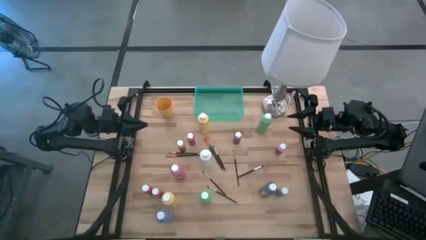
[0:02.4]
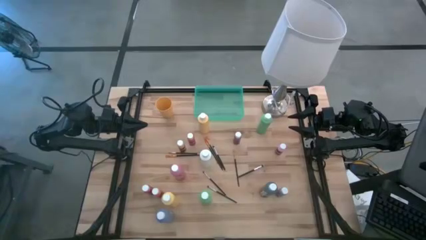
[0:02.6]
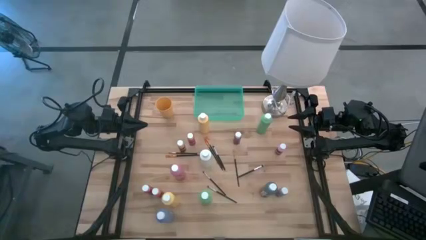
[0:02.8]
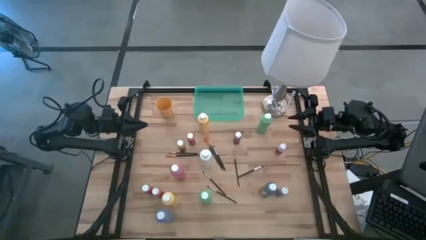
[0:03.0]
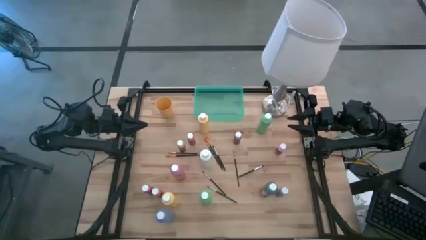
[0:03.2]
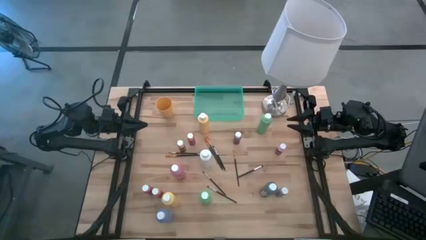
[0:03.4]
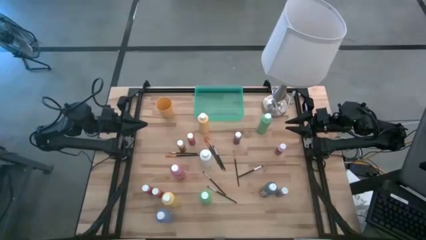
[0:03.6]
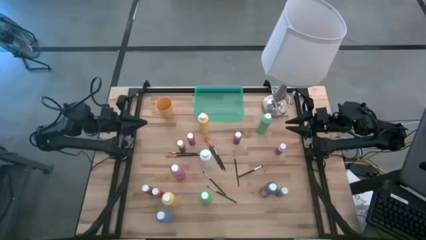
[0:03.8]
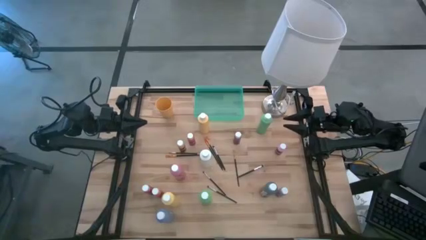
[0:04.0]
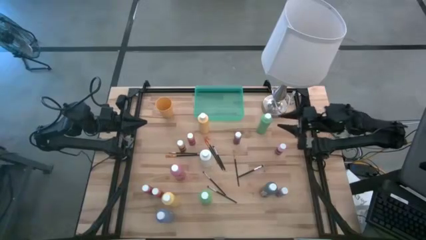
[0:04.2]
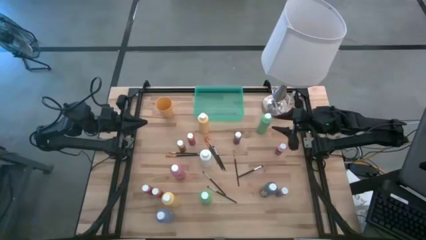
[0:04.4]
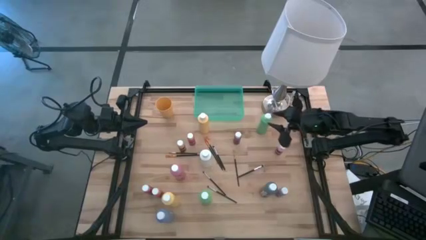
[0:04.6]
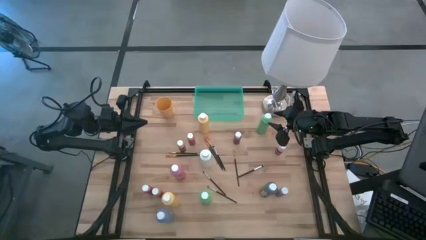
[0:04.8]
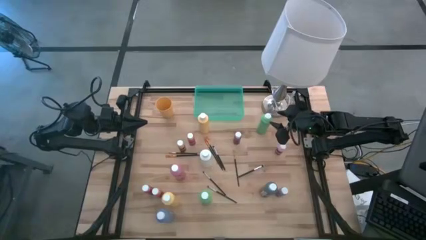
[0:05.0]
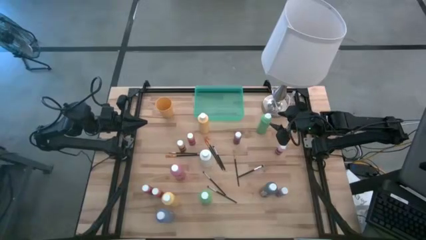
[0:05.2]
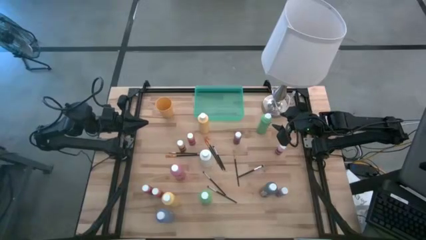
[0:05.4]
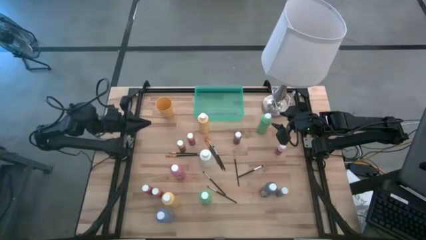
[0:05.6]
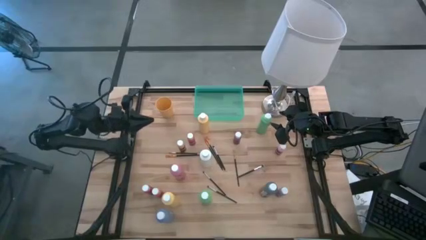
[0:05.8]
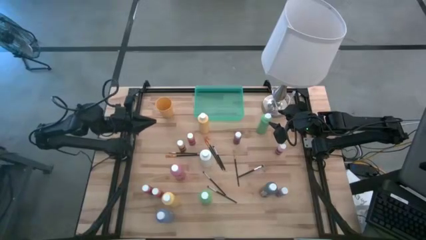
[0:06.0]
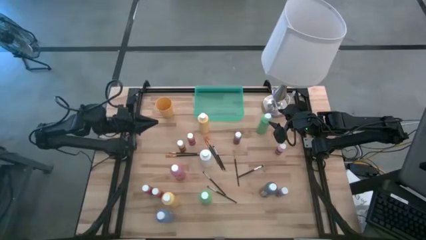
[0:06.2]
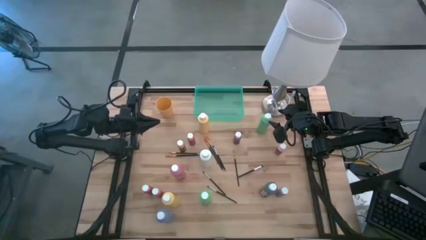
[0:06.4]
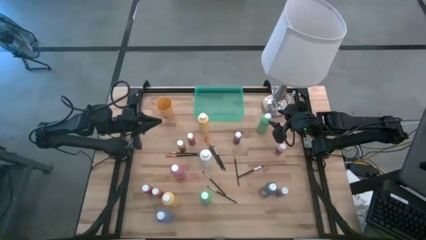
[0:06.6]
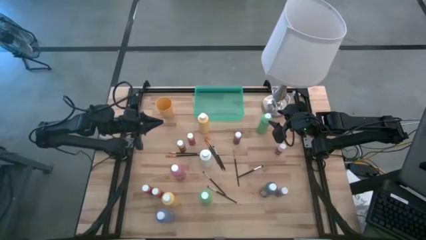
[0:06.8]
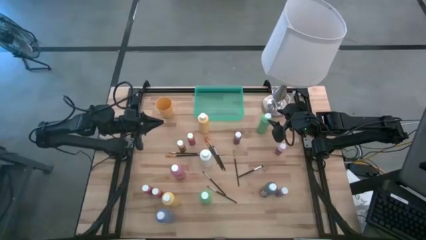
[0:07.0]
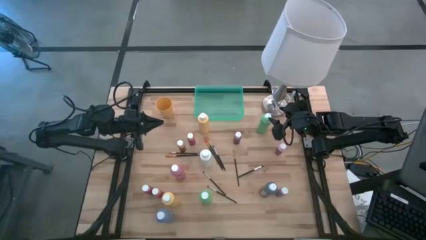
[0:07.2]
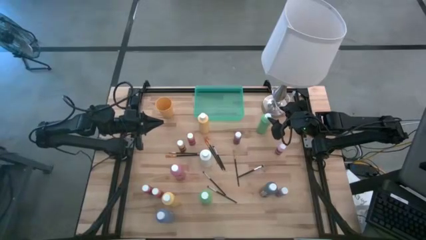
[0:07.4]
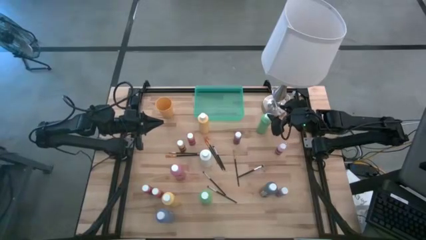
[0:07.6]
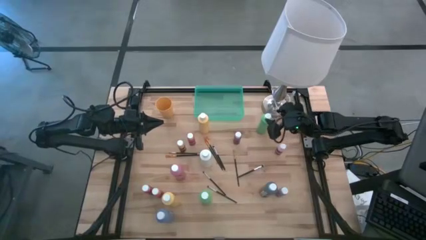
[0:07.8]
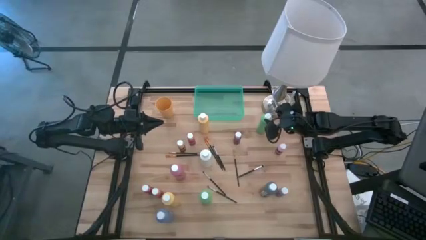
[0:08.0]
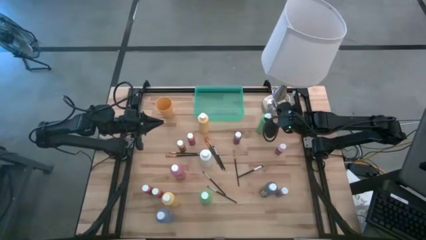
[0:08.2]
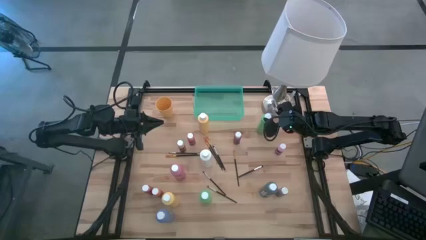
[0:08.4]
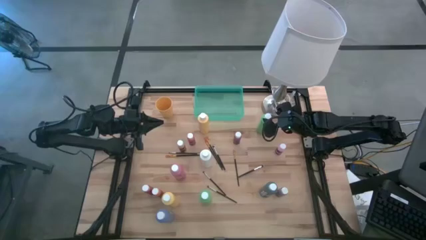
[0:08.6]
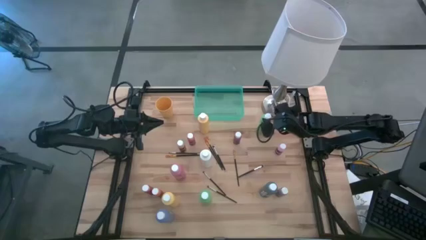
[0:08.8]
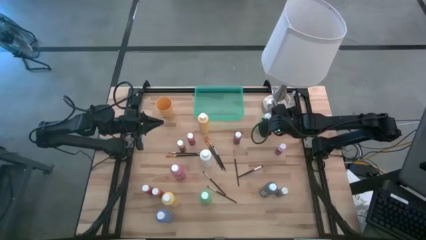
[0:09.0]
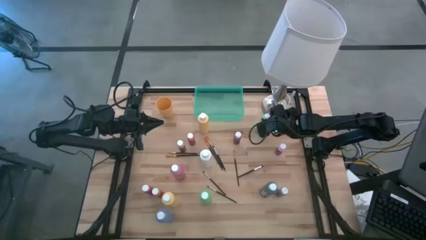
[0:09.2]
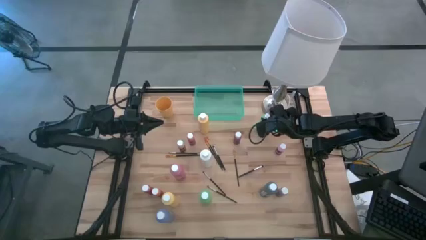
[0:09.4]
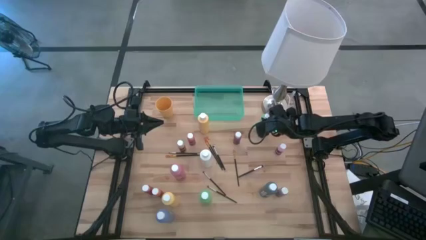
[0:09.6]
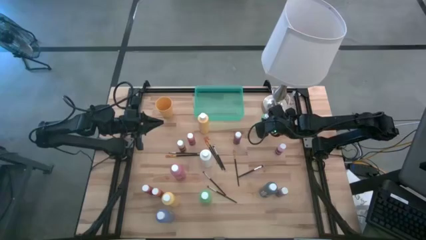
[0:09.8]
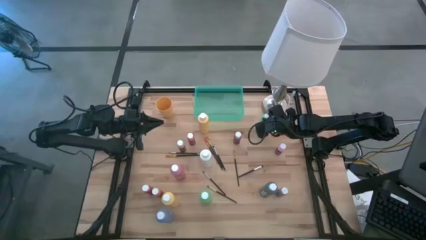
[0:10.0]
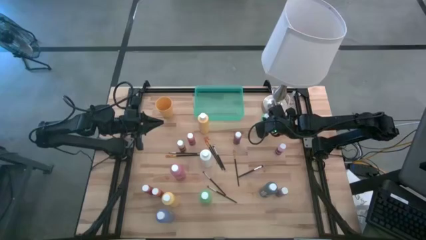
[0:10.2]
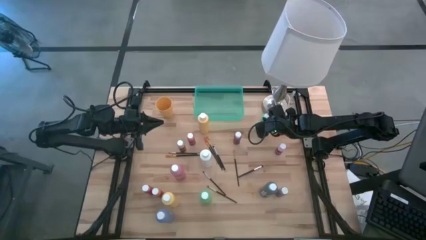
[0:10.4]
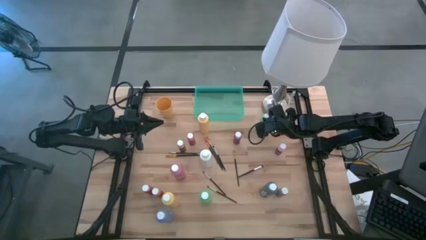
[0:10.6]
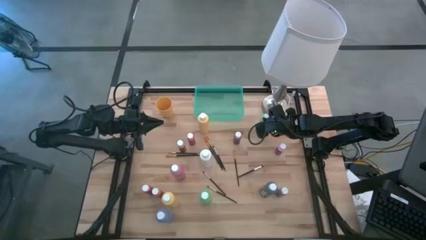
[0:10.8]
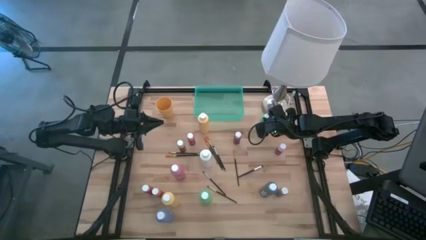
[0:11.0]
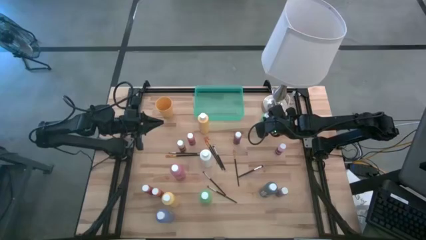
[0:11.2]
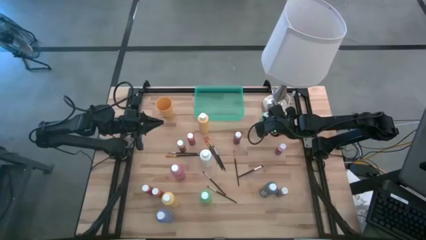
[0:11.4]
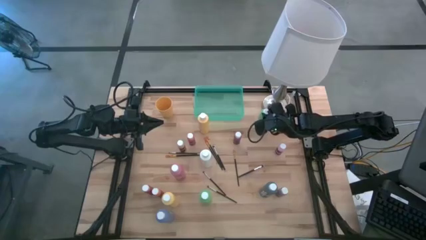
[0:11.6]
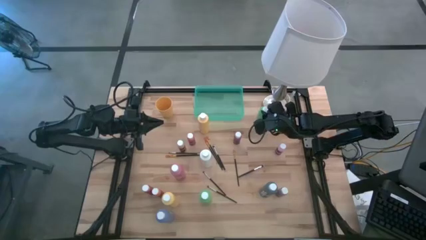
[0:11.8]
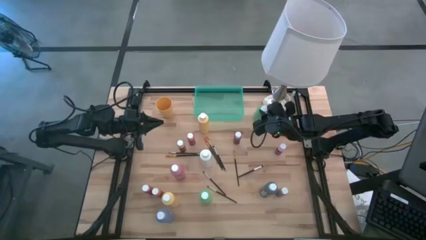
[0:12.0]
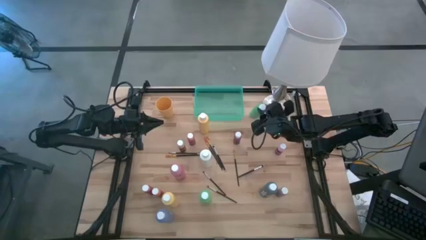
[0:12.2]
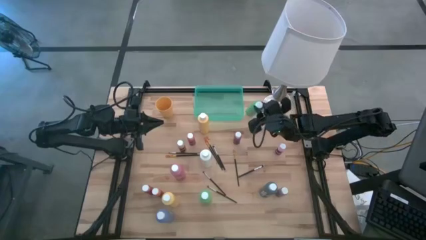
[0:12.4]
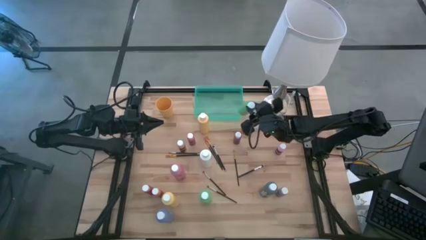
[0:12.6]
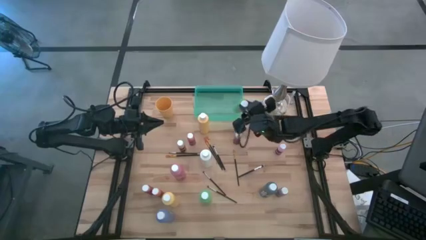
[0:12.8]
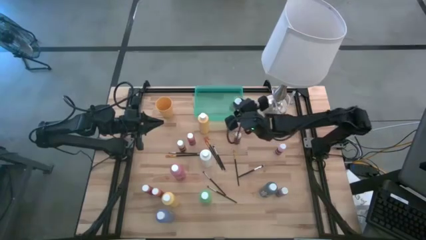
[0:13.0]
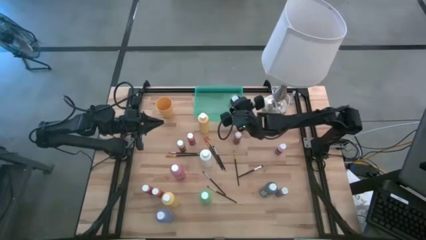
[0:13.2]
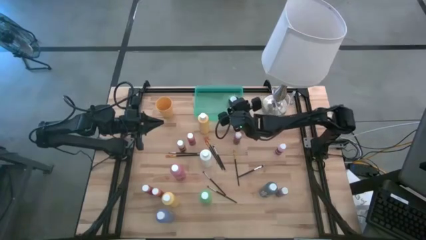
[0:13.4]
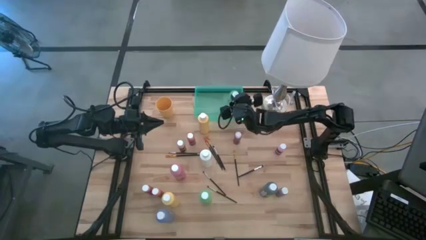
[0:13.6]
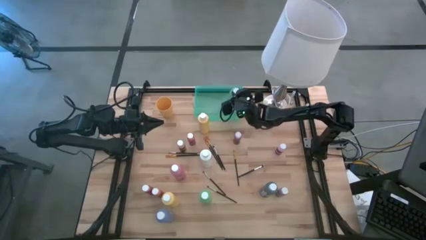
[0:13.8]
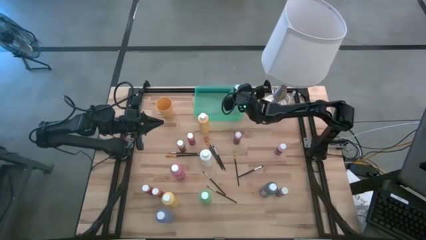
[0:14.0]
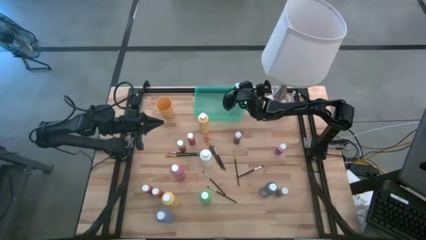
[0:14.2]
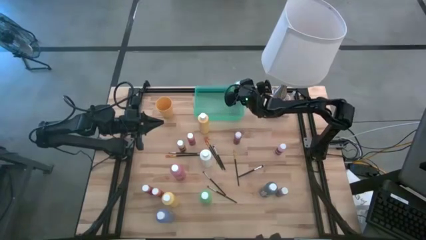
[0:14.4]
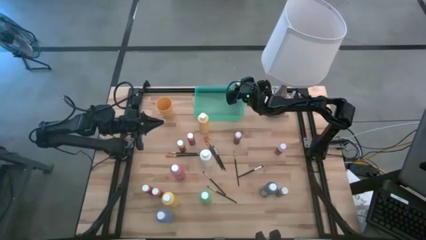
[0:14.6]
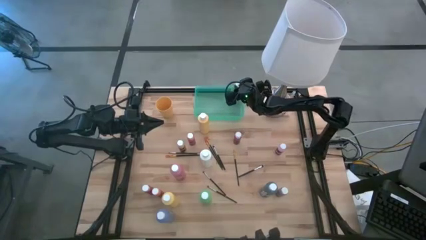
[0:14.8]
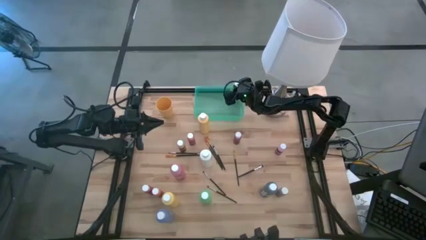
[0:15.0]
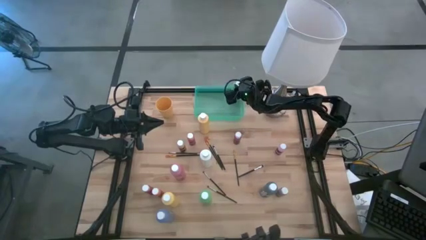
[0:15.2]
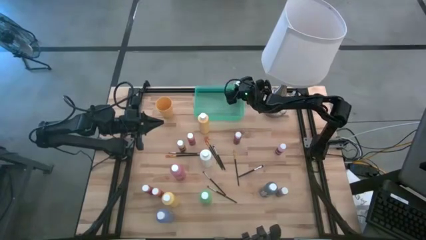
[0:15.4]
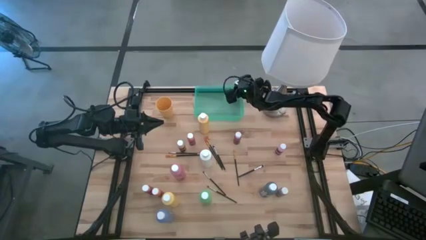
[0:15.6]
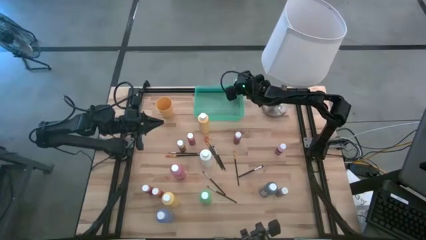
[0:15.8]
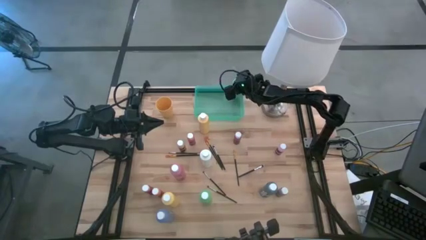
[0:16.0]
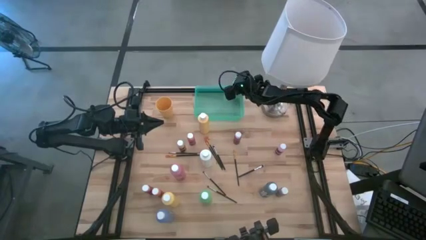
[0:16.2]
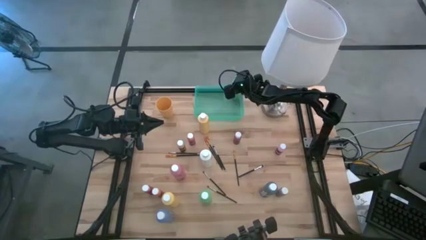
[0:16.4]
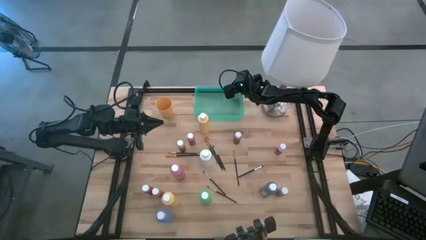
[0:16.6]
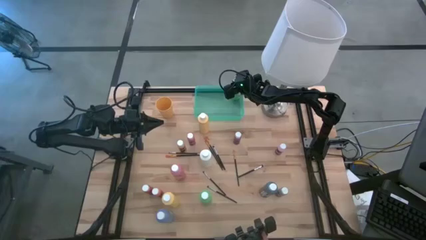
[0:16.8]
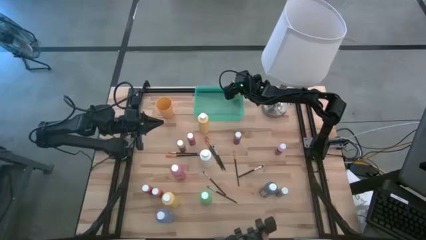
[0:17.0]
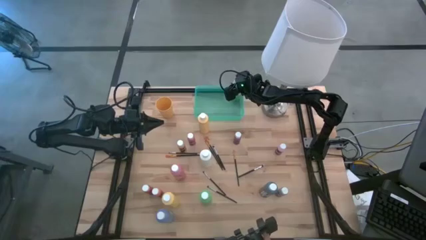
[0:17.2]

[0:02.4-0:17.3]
Task: Pick & Place Paint Supplies
Put the green paint bottle into the green bin
